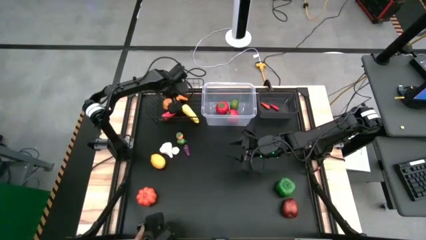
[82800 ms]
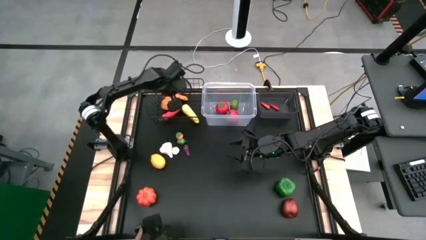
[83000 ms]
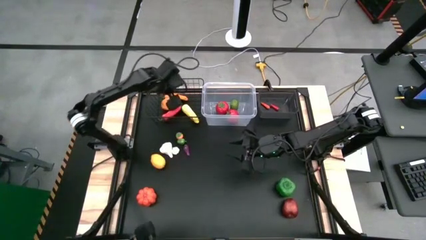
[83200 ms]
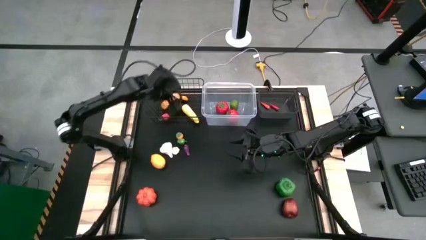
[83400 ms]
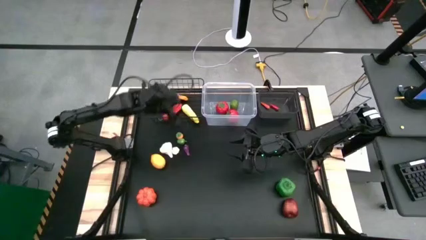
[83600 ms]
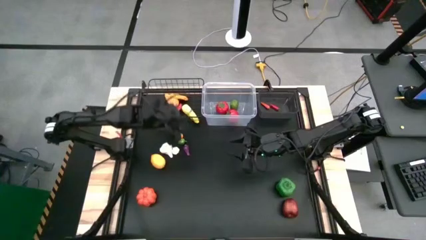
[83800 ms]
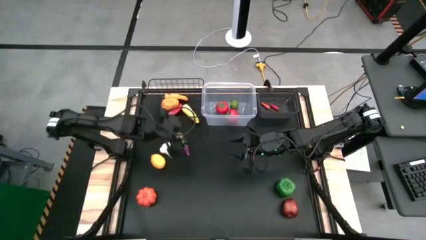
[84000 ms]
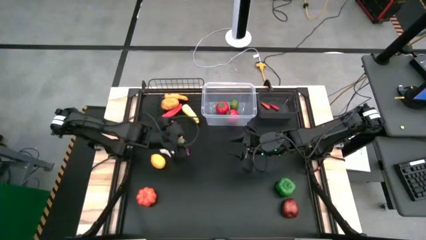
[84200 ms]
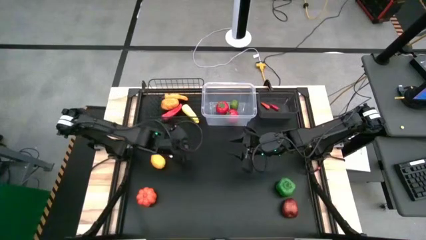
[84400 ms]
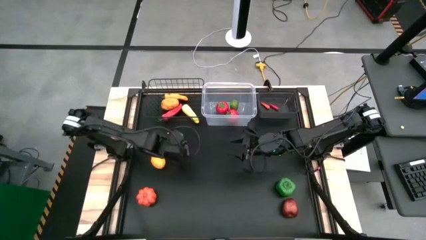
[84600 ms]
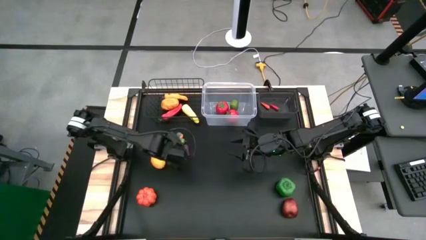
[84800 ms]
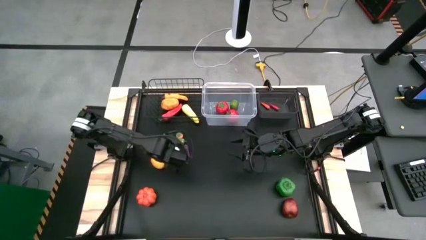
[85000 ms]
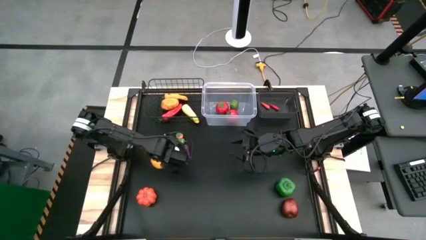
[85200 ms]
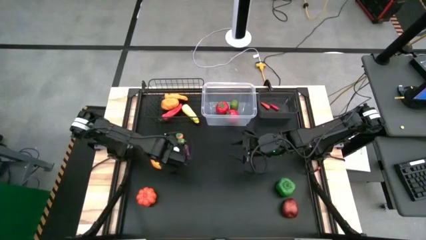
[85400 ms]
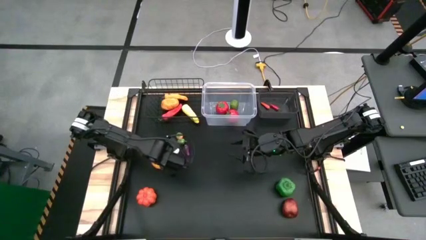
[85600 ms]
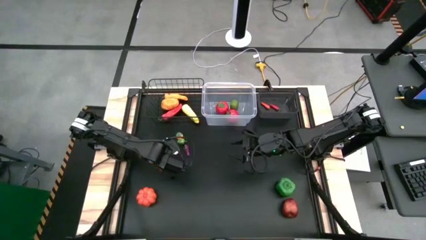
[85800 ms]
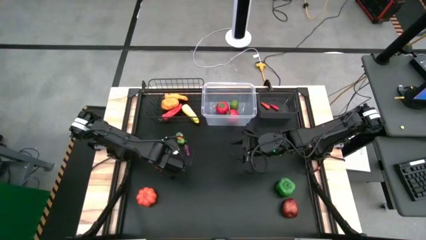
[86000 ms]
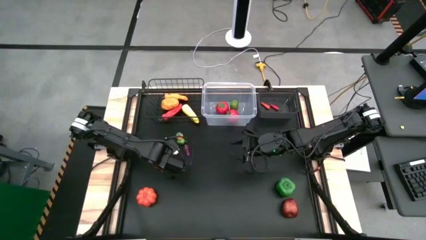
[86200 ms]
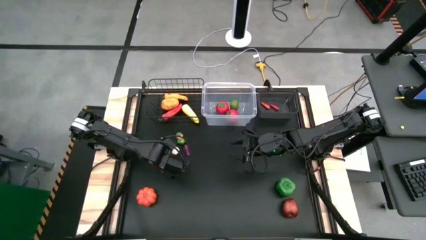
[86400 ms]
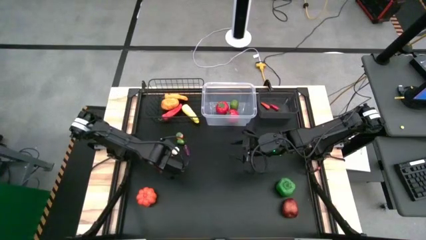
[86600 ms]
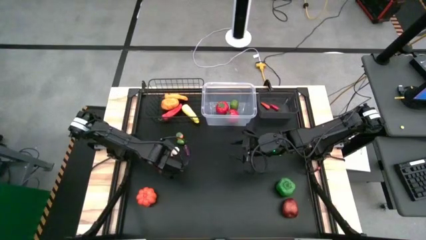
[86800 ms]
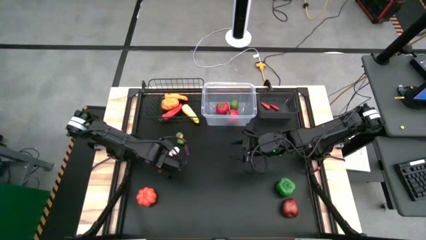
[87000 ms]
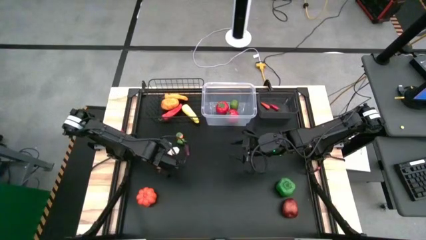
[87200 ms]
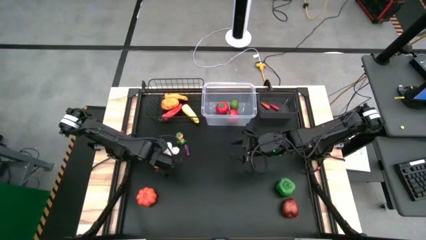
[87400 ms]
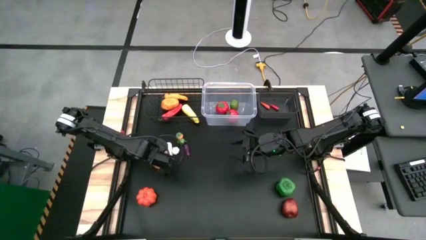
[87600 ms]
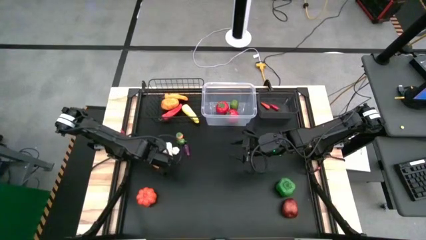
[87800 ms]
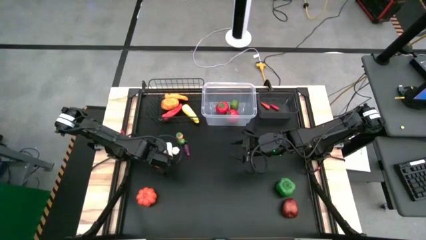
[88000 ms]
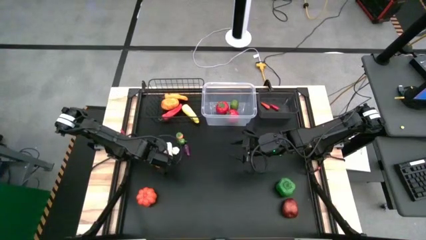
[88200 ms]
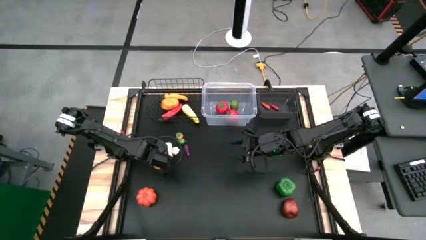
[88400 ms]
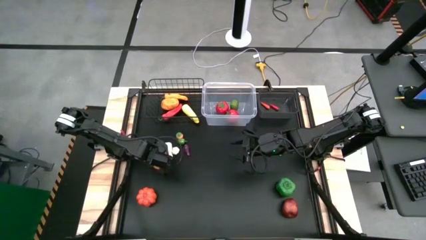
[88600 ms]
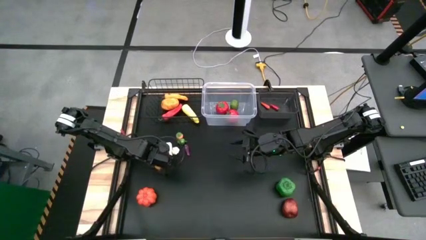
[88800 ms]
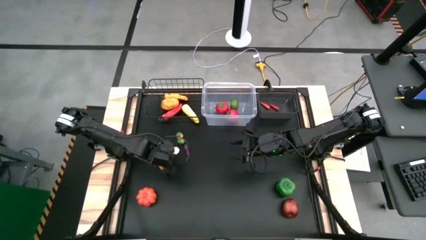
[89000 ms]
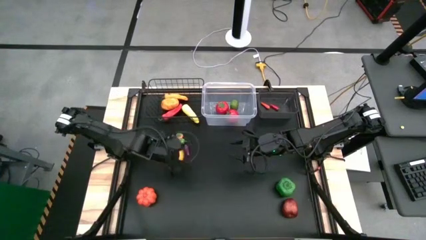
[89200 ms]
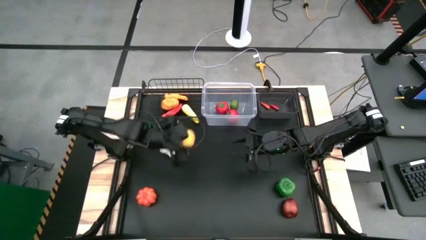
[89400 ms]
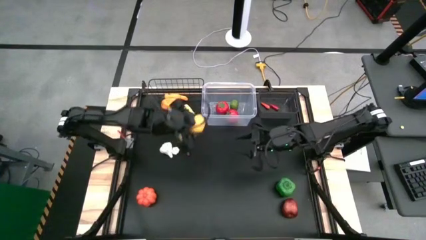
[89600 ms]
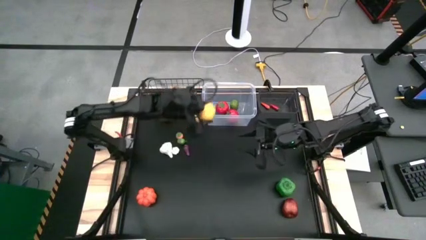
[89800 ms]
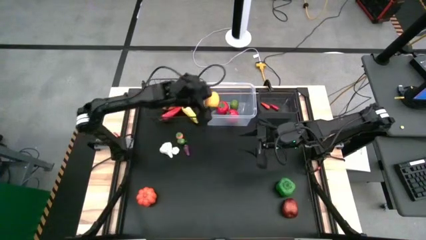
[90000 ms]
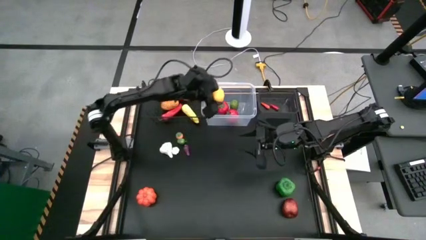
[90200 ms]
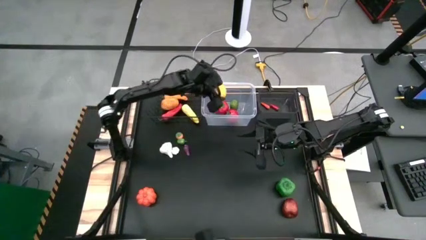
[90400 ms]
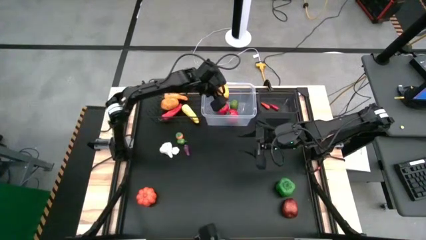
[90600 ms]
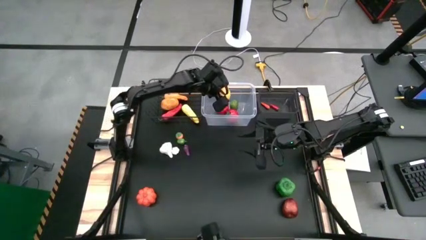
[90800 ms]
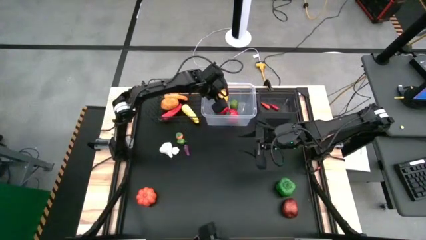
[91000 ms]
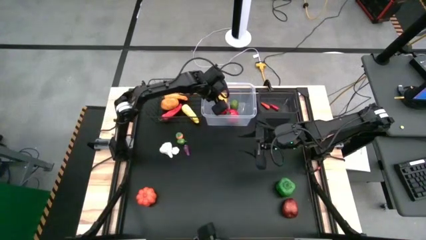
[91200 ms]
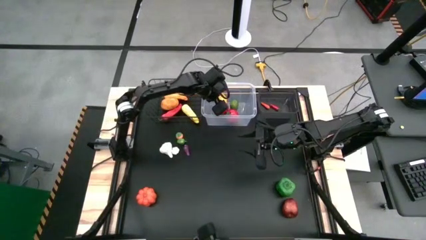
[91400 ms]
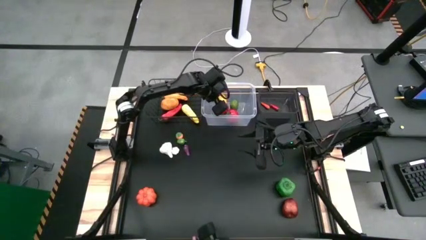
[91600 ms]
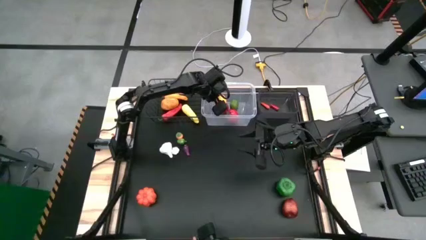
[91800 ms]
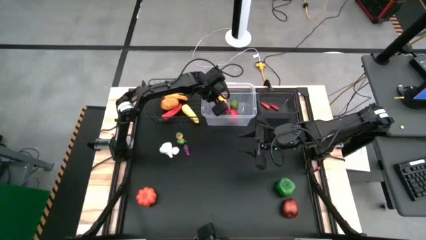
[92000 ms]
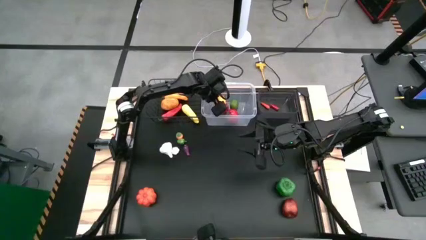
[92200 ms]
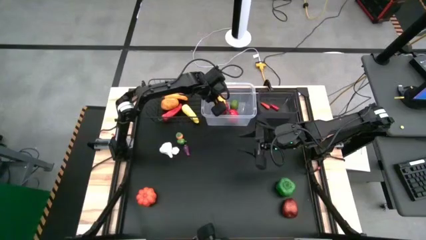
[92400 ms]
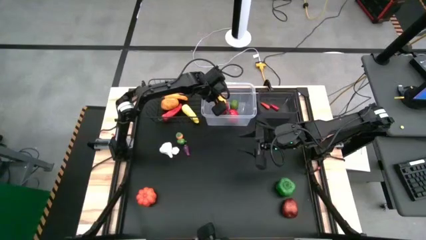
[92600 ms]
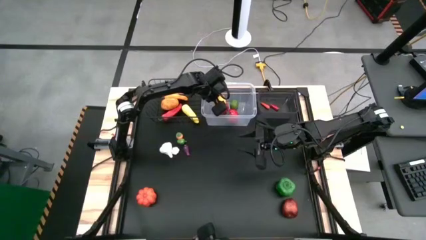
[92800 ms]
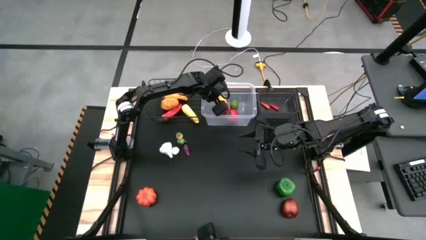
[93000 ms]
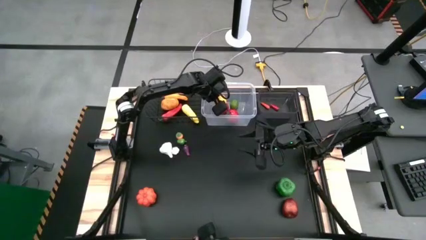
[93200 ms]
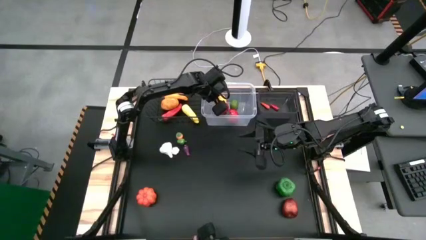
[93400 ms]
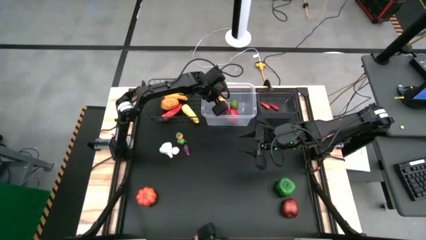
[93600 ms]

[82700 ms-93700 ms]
Task: Sort produce into baskets
Put the lemon into the transparent bin

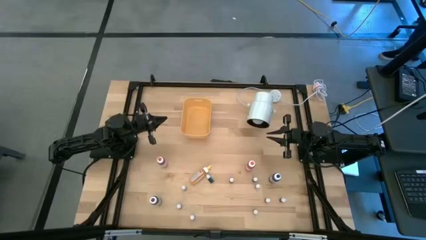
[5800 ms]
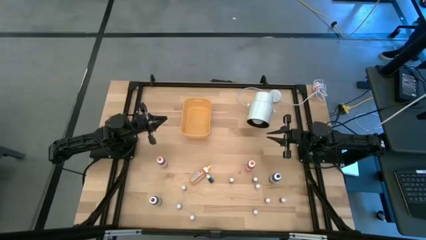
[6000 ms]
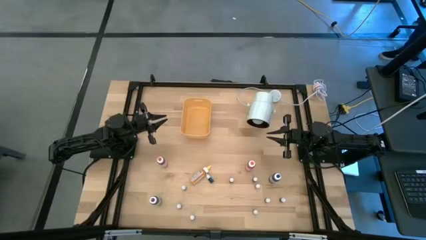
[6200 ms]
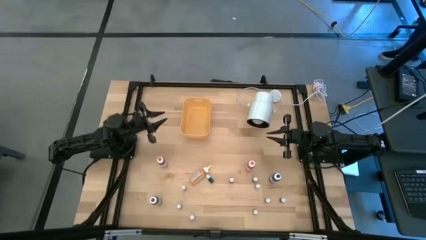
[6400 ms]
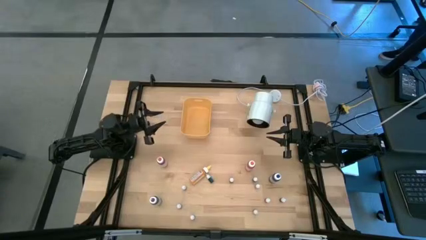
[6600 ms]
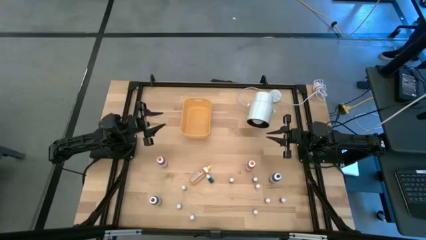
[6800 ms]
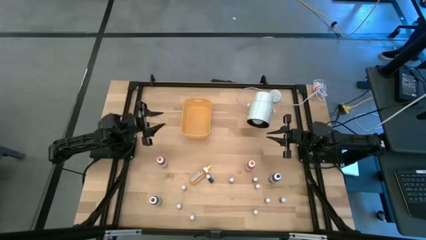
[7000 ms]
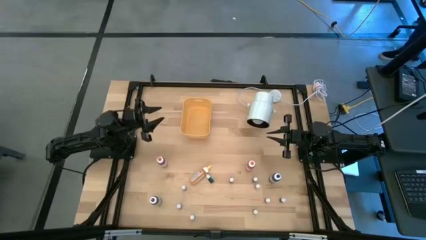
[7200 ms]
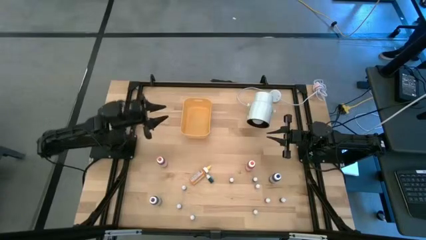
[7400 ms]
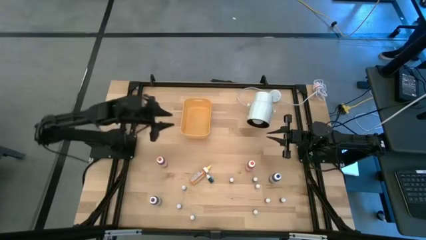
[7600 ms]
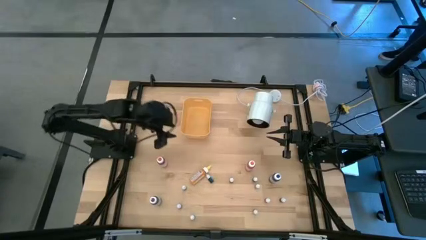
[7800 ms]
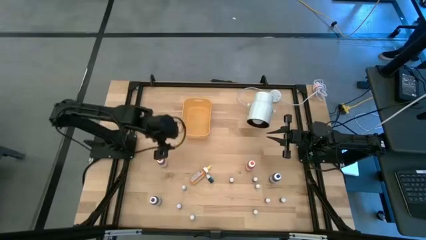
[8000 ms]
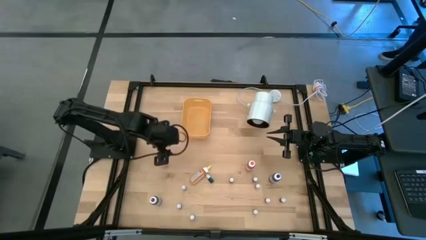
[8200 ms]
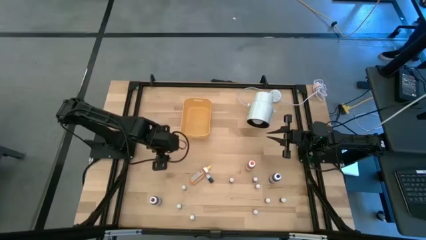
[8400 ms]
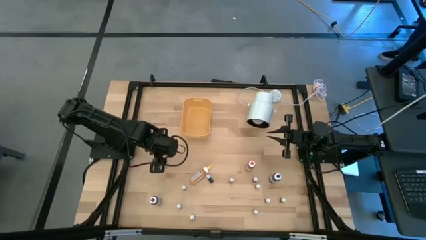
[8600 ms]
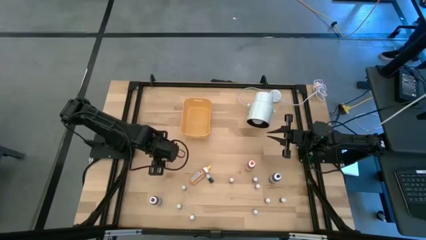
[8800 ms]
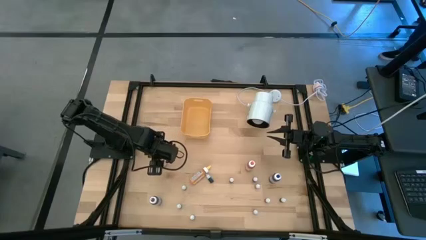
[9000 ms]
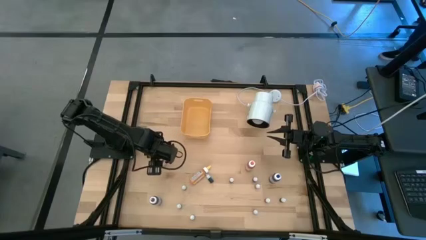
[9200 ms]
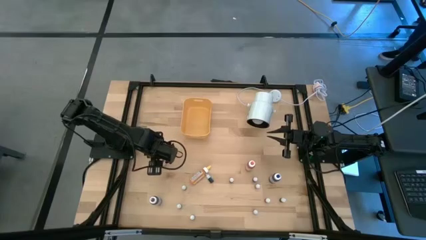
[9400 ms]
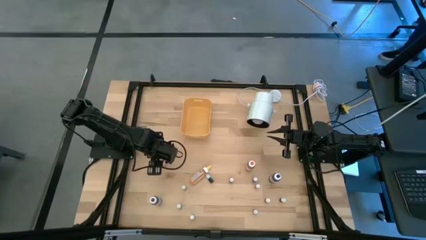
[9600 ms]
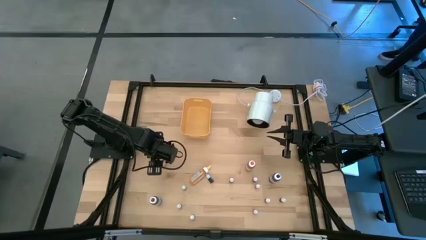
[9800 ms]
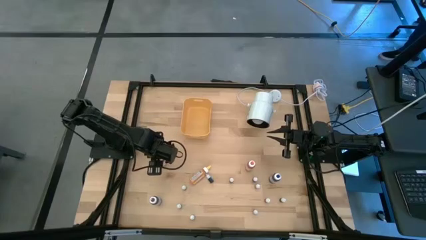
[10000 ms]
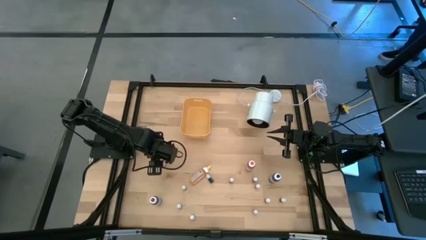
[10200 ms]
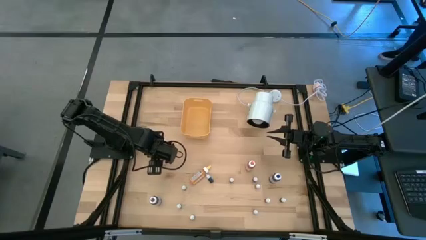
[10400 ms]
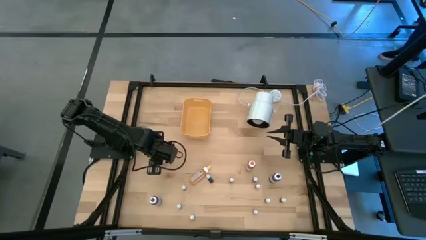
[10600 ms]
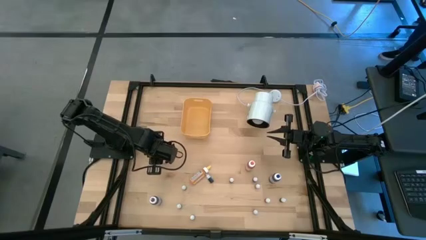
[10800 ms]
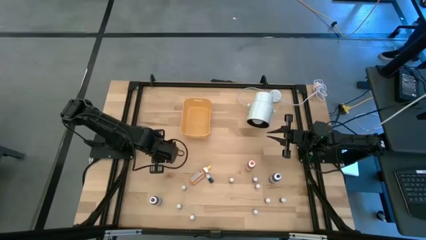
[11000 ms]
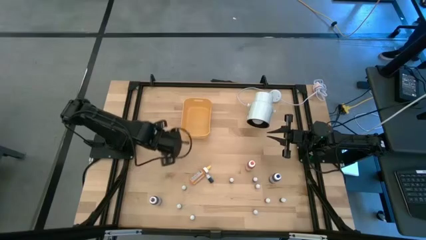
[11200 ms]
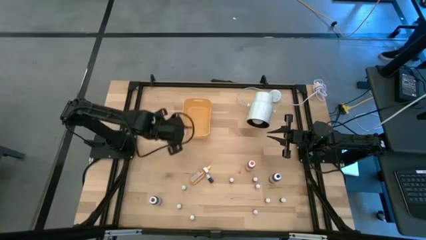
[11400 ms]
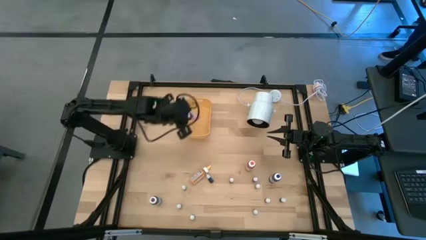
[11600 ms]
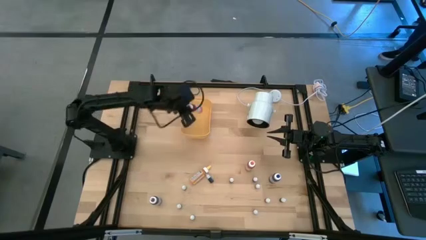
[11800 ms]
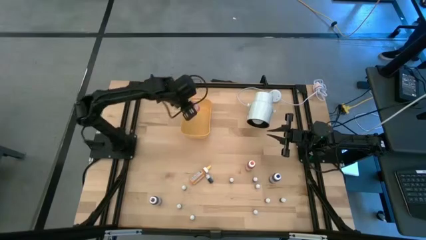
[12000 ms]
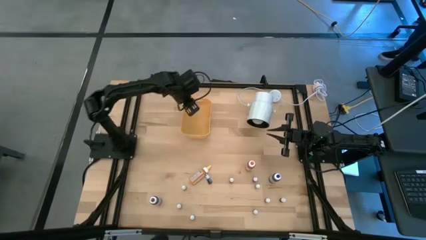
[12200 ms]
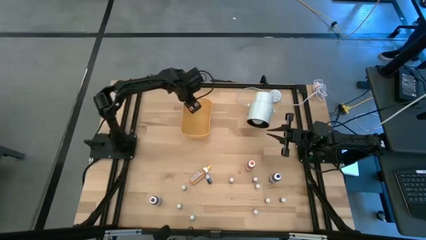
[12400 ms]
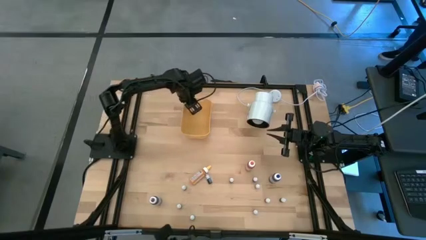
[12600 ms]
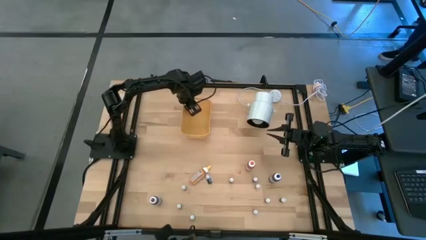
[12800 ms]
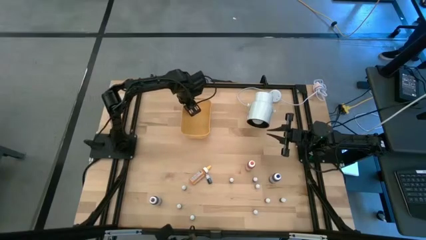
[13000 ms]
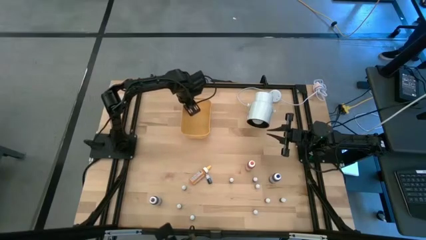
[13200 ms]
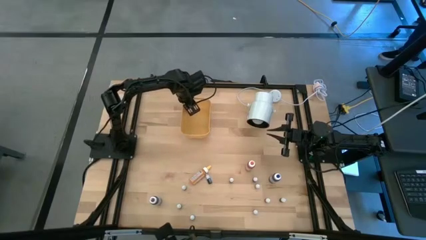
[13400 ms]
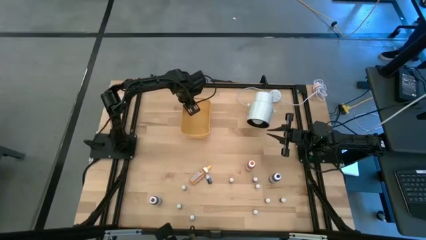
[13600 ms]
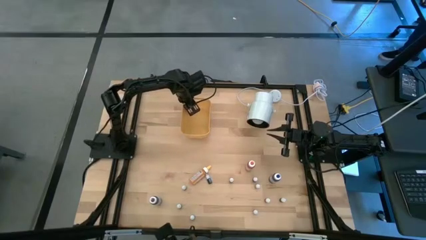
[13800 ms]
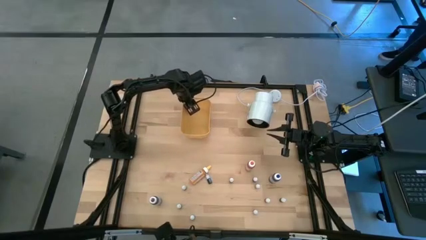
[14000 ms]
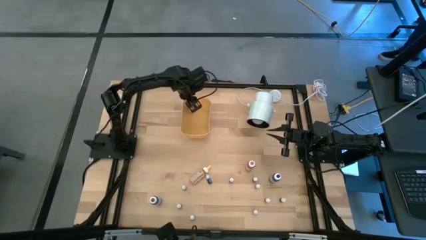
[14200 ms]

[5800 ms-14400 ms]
Task: Pick & Place food coloring
Put the large pink food coloring bottle into the yellow bin
